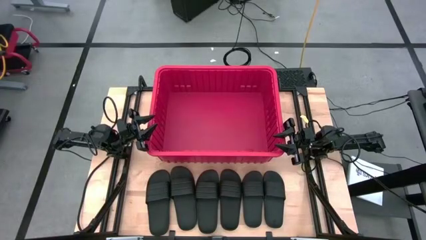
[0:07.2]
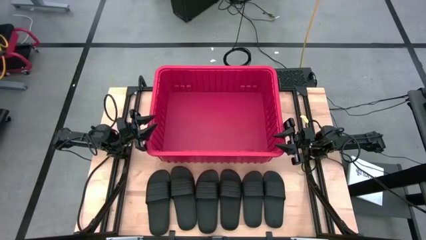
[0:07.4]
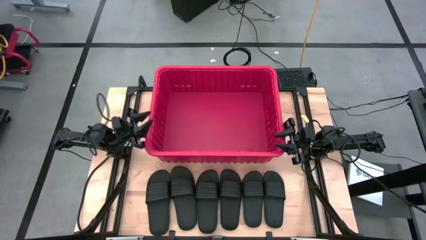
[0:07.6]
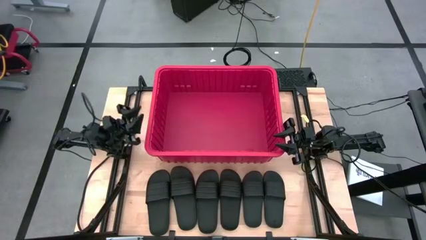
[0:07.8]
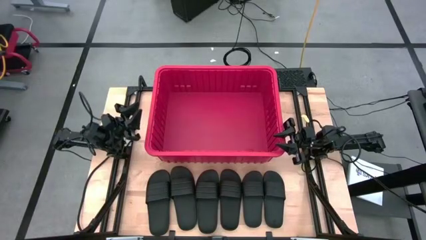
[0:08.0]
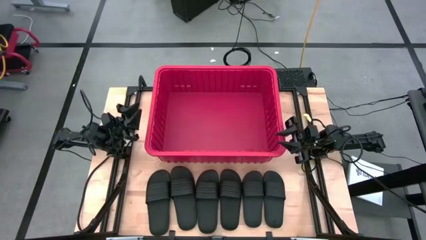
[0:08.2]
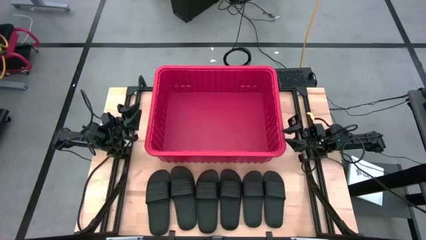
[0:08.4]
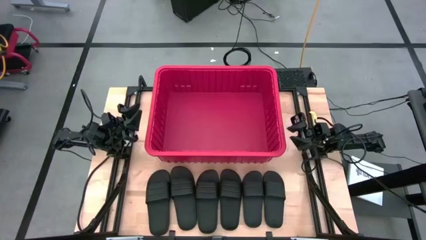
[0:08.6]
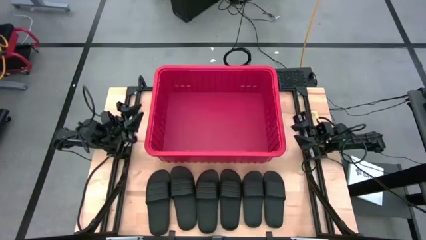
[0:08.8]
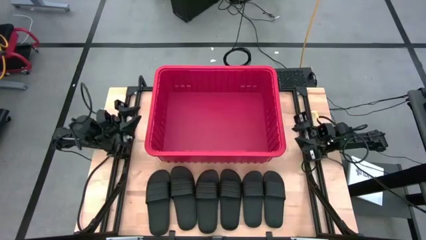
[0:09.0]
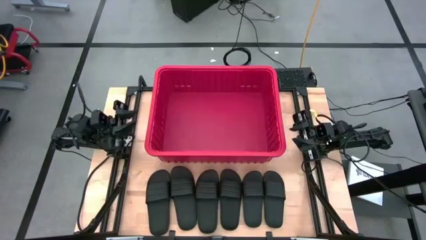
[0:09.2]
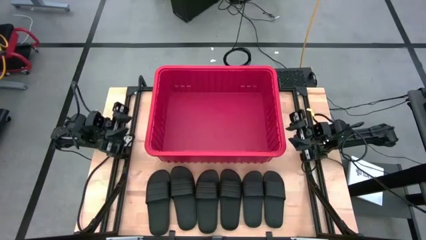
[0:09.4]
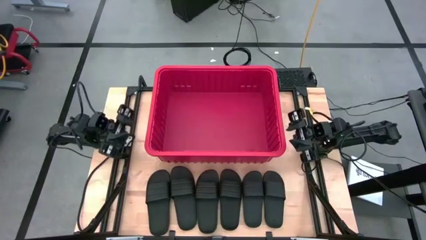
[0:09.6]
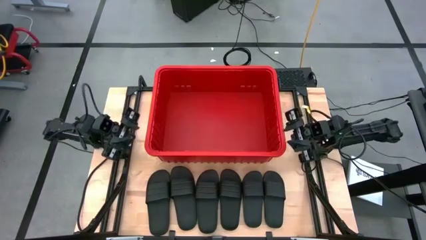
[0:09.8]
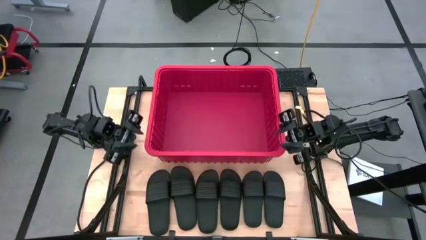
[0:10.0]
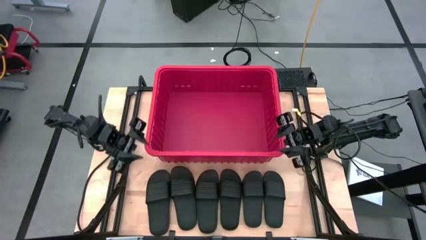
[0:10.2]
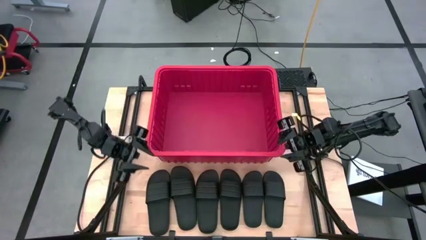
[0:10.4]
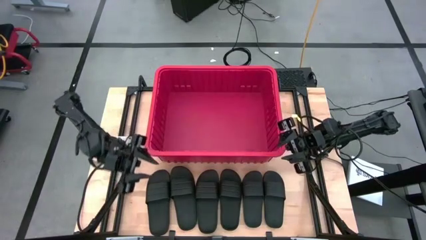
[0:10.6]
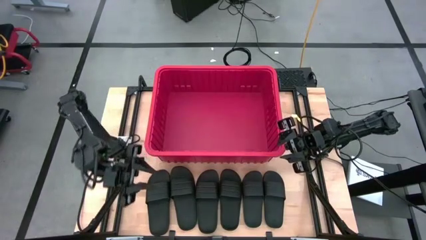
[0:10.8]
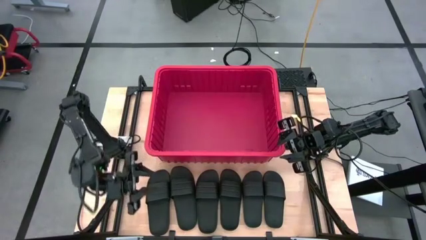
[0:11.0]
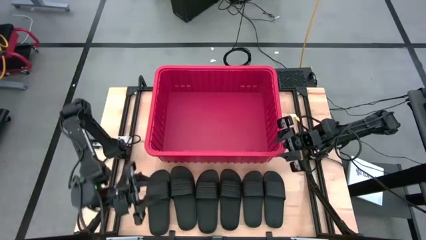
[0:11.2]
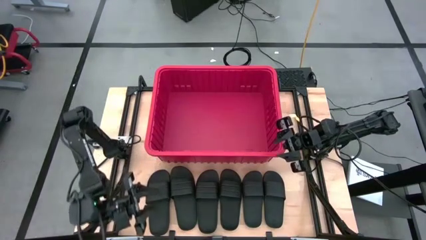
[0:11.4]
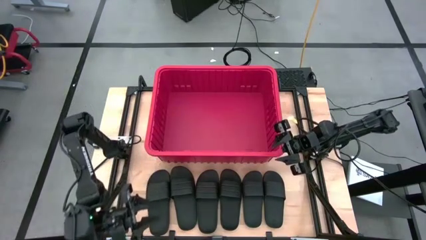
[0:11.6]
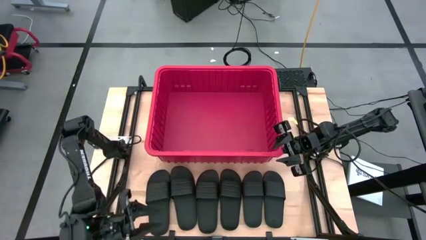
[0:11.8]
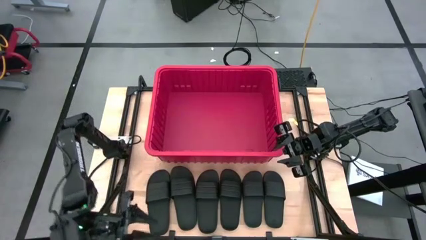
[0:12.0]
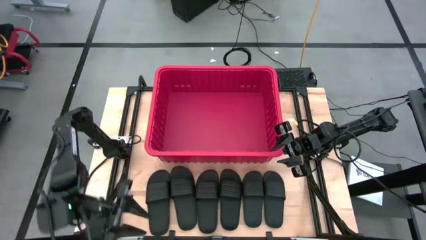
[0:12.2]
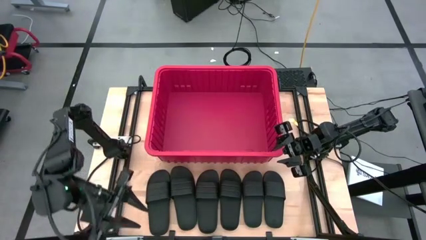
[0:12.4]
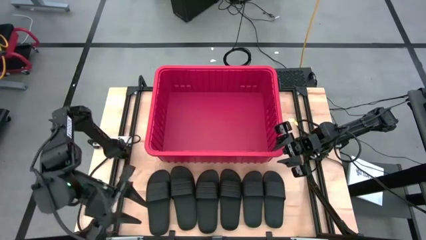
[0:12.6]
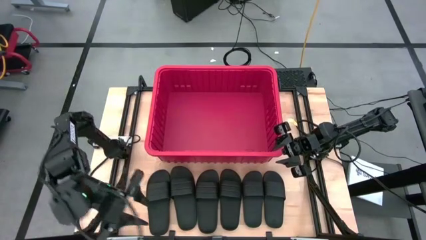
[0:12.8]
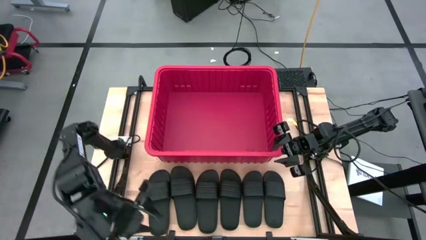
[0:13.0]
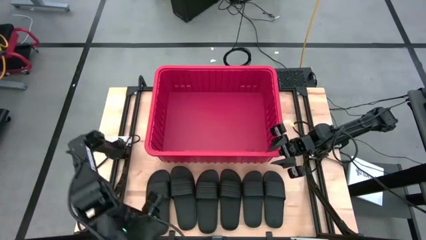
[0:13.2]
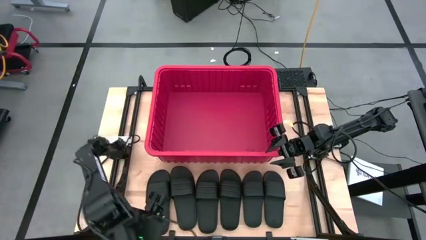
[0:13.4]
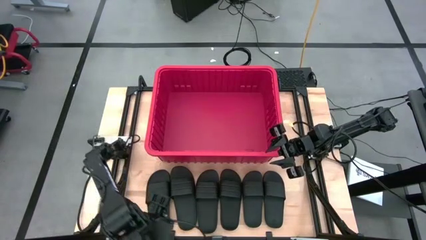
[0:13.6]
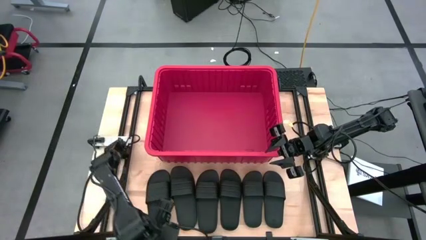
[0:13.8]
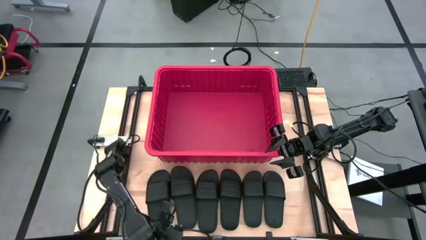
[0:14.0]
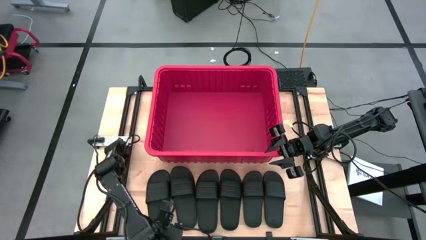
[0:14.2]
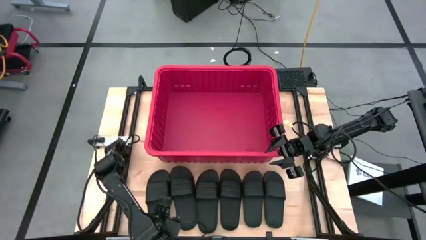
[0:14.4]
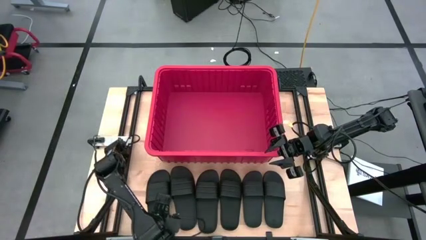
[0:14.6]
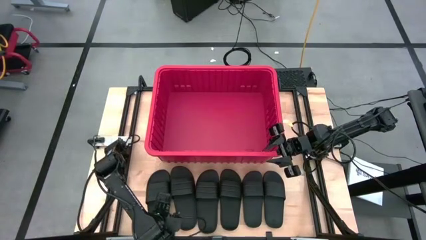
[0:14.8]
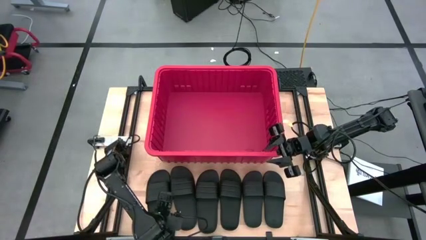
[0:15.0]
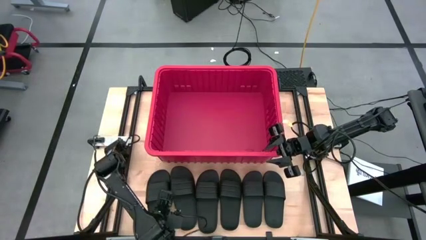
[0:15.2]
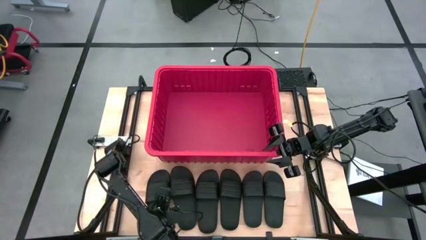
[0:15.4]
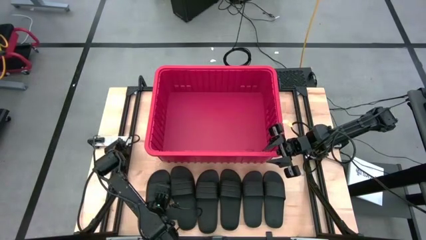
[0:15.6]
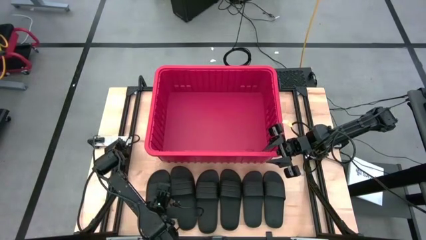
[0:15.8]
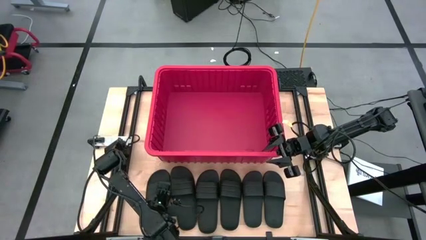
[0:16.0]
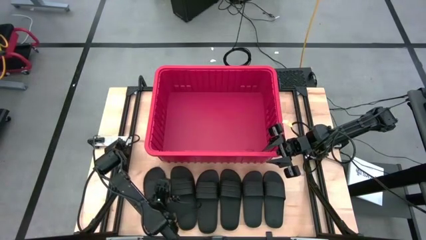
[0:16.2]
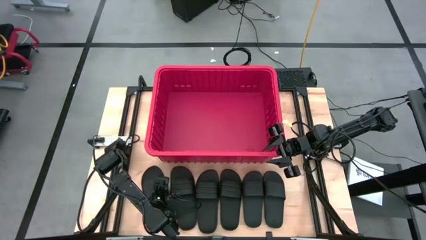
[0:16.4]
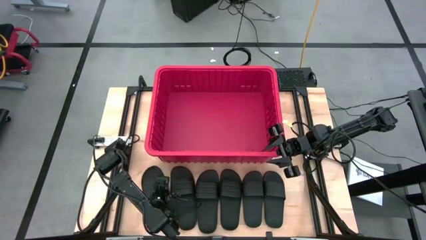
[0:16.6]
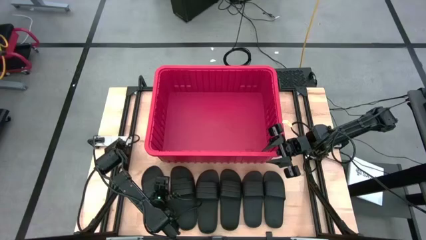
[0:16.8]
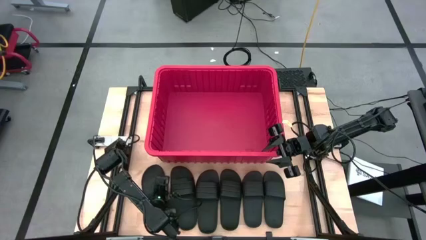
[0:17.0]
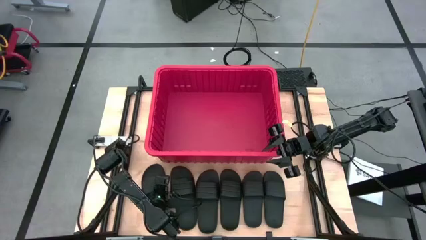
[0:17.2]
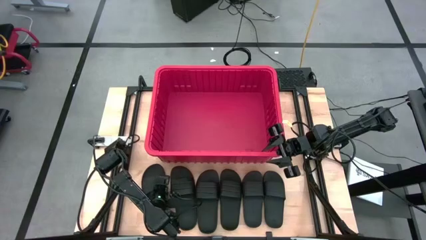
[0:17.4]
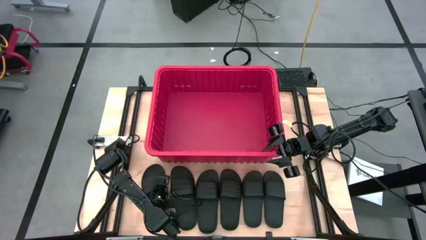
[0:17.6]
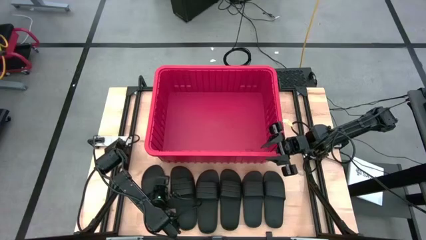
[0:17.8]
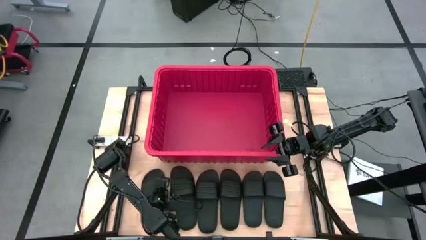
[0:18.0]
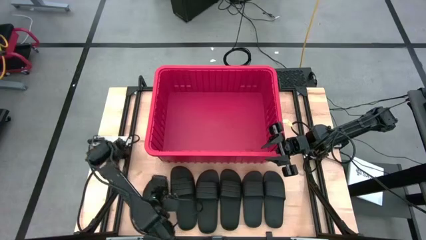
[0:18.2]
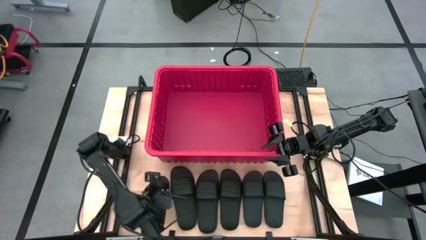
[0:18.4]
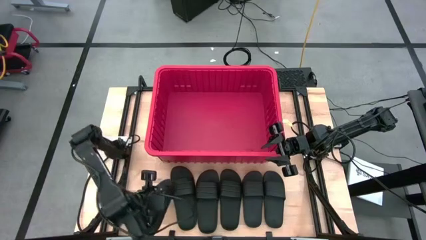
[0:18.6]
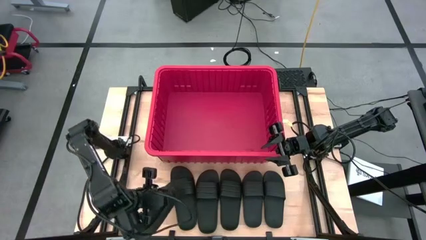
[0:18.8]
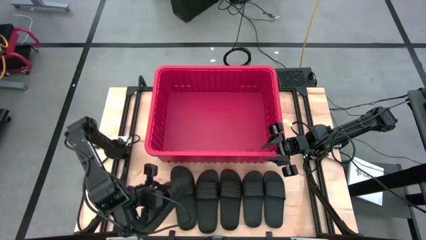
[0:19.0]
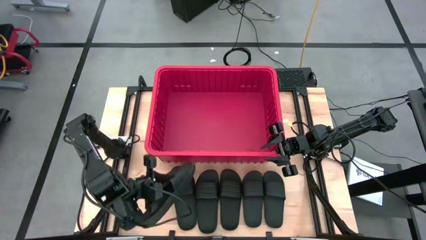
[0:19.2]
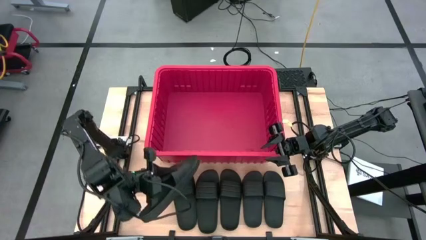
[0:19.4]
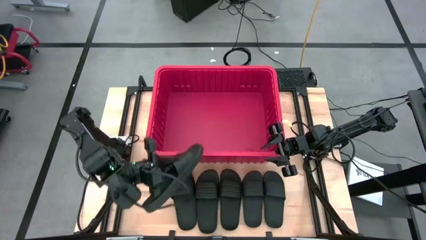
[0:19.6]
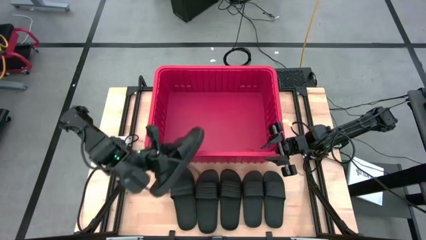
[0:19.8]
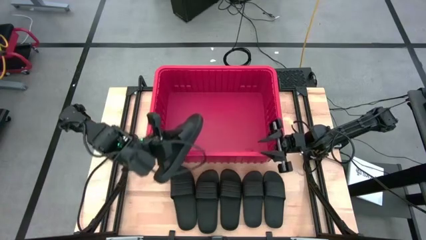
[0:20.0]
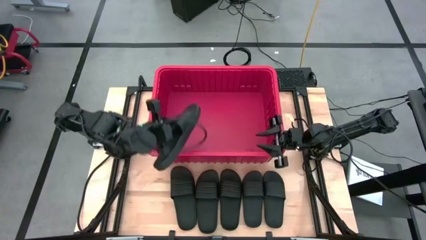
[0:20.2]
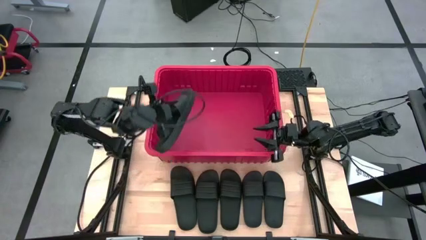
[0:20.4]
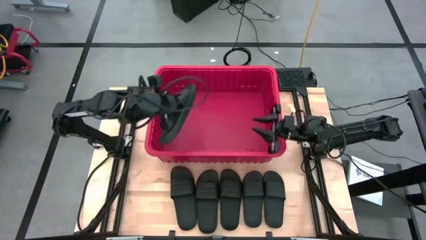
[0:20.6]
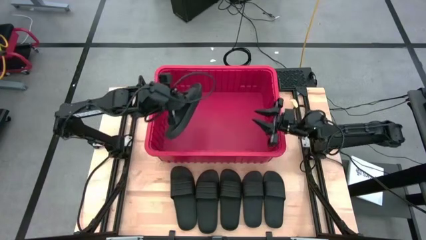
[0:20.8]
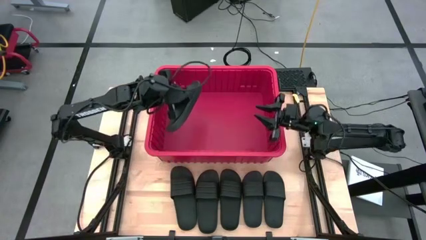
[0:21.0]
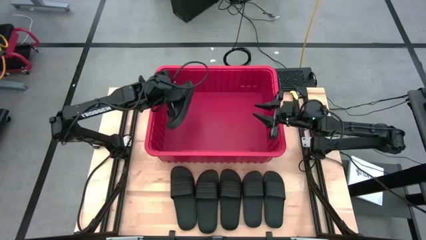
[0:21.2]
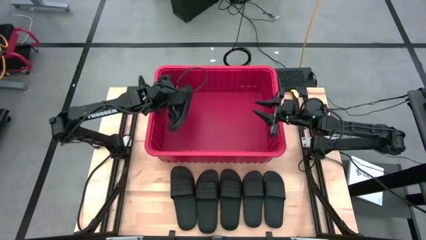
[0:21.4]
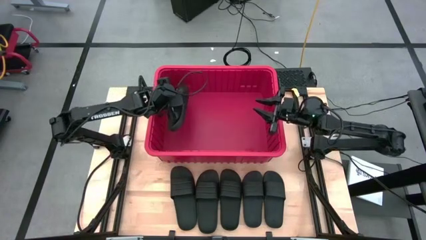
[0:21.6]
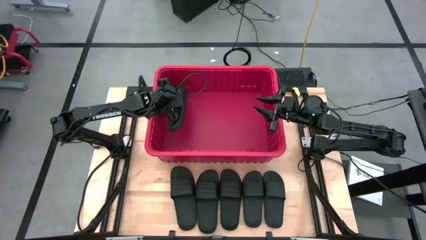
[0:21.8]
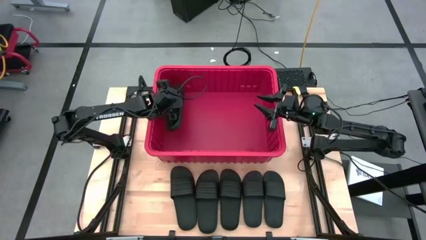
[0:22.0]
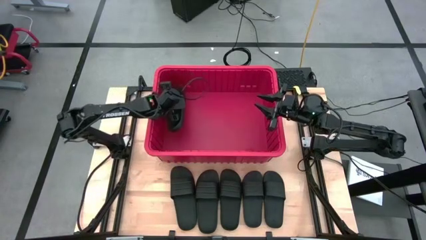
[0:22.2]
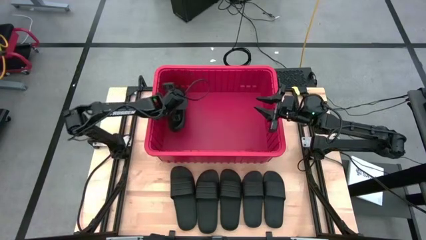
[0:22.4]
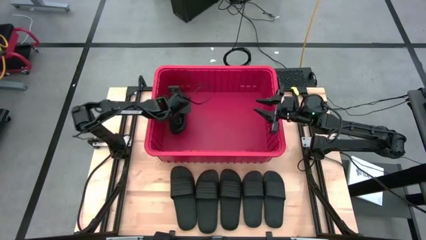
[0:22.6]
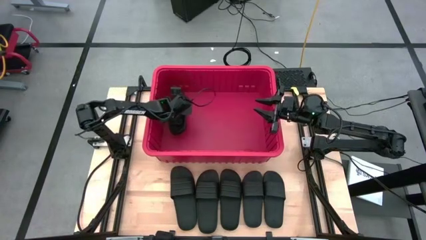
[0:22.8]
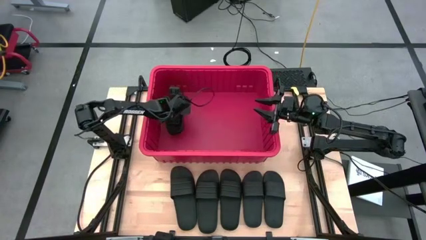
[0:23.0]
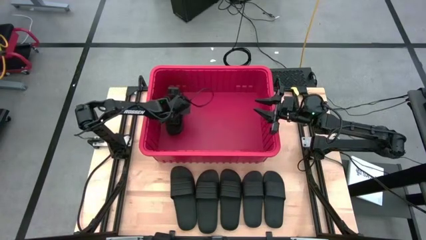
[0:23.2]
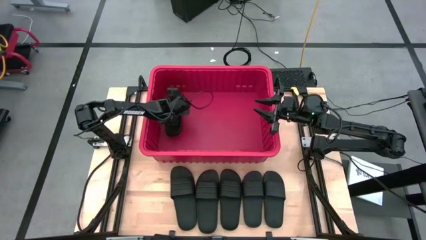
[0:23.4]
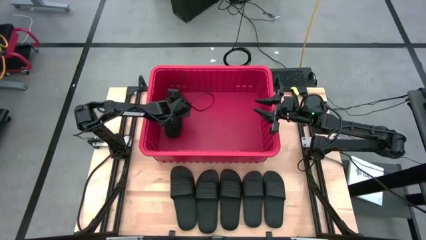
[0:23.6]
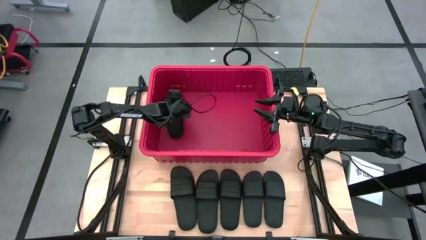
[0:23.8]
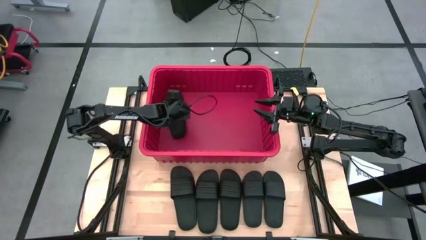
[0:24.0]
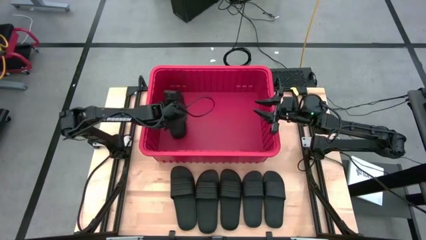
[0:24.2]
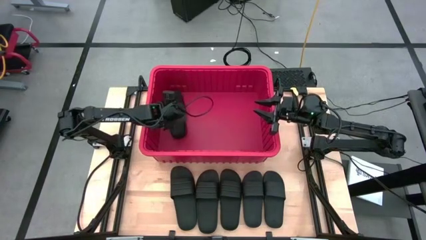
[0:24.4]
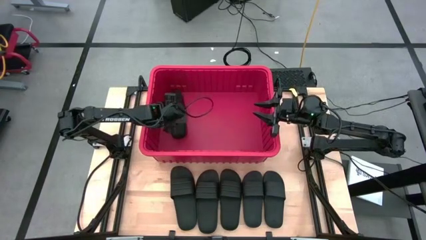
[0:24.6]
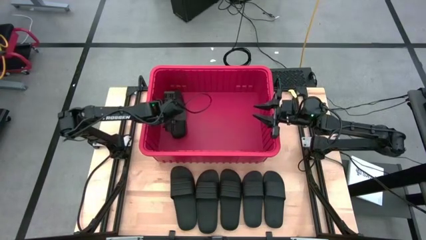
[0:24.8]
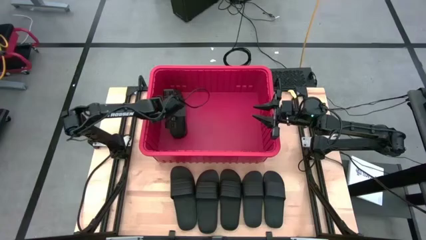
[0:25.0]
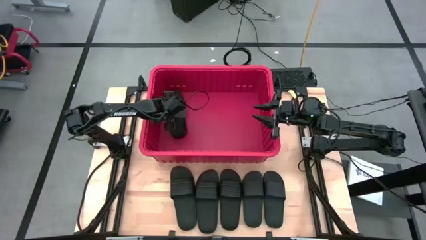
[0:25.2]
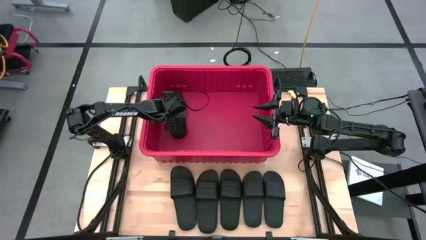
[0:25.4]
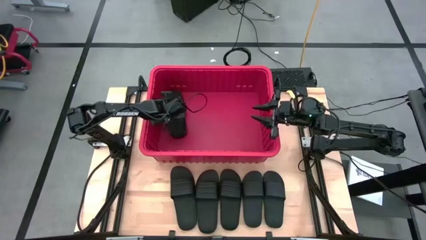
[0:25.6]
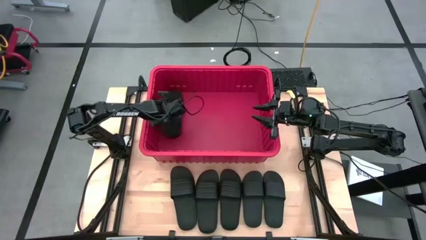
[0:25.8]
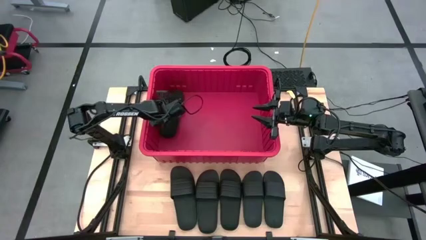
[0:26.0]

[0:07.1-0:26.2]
Task: Pick and place slides into bin
Put the black slide into the red bin
